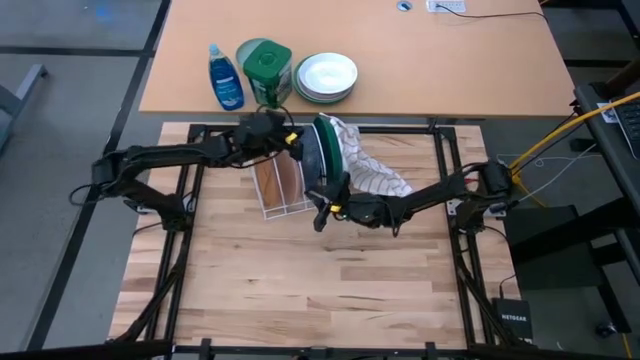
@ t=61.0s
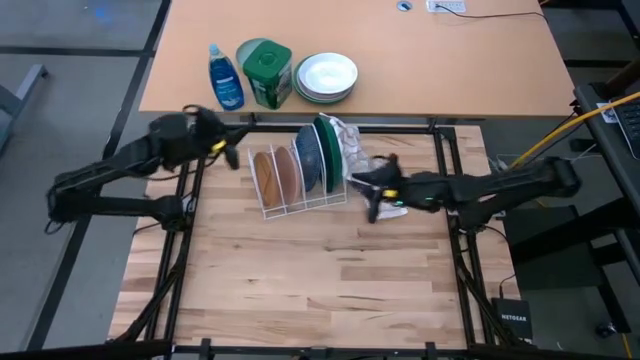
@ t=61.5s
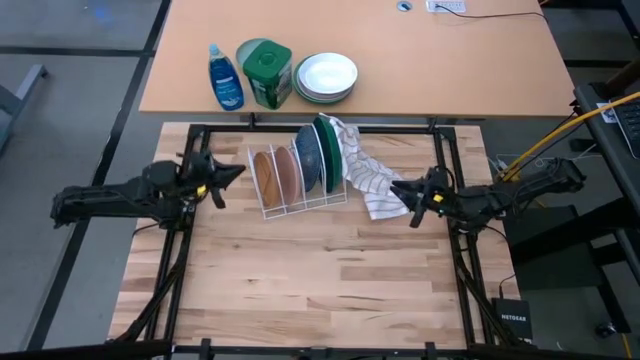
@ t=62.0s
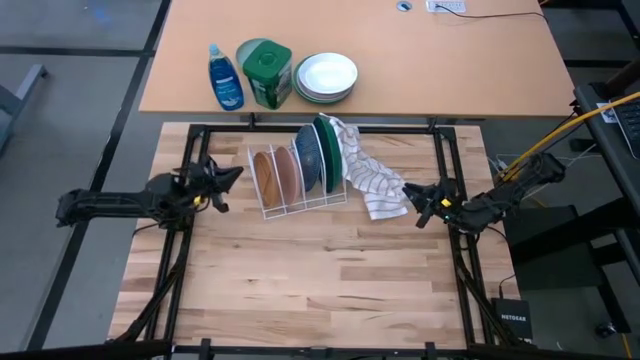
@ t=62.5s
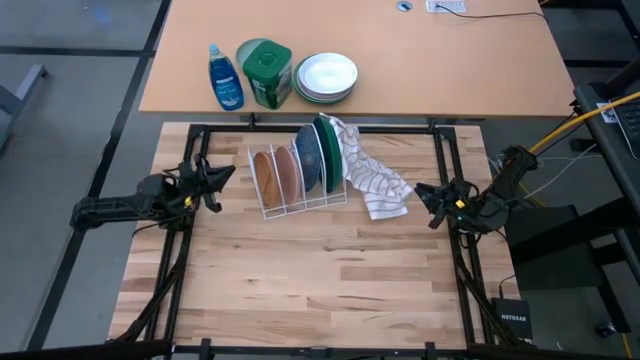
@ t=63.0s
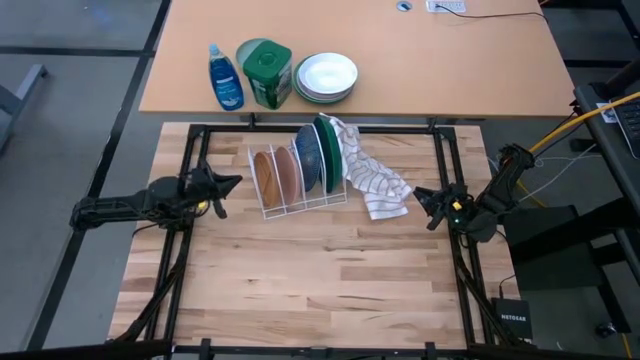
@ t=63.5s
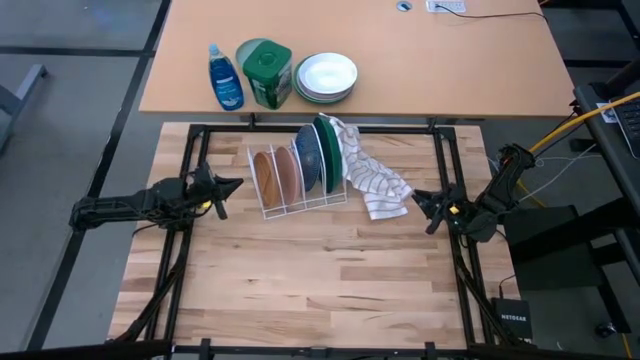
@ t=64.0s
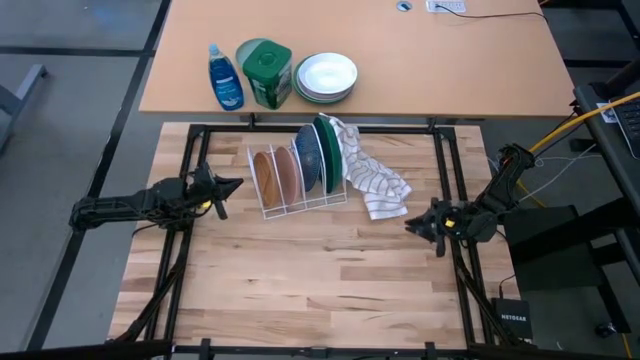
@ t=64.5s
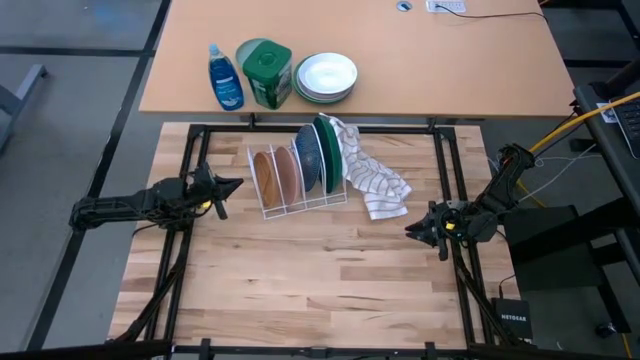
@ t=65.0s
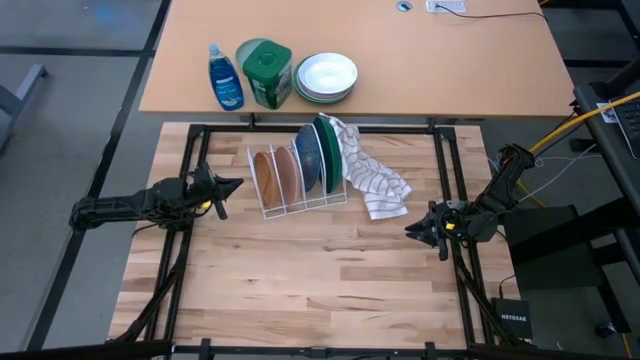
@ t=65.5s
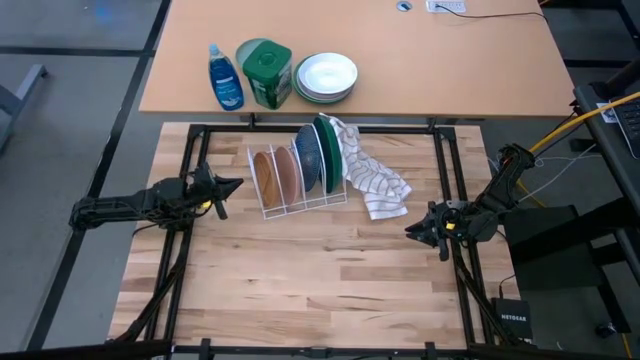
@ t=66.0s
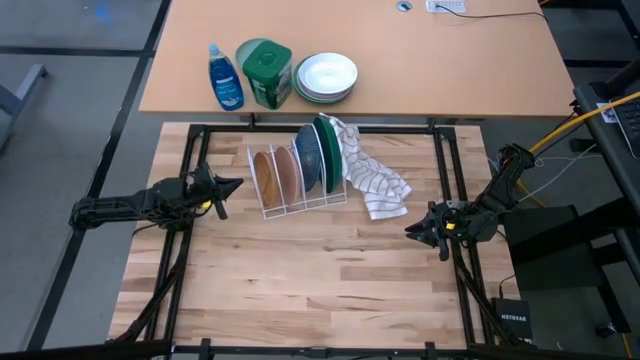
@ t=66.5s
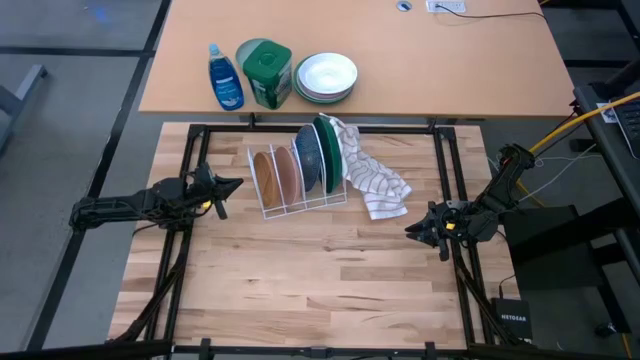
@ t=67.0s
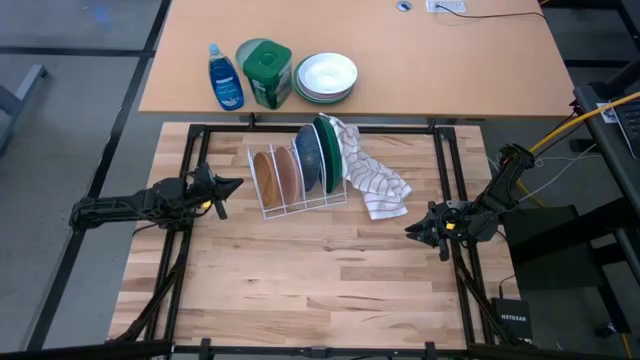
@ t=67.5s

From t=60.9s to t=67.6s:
Task: Sort dishes
Return to Home Position

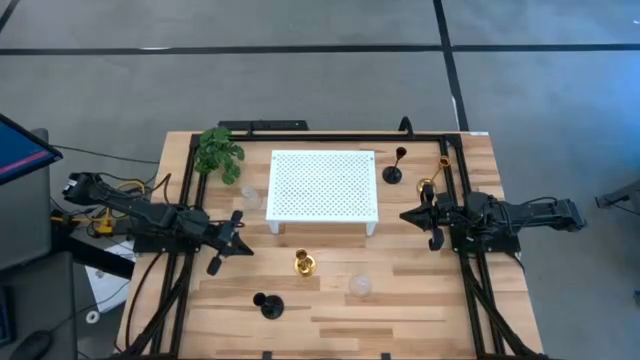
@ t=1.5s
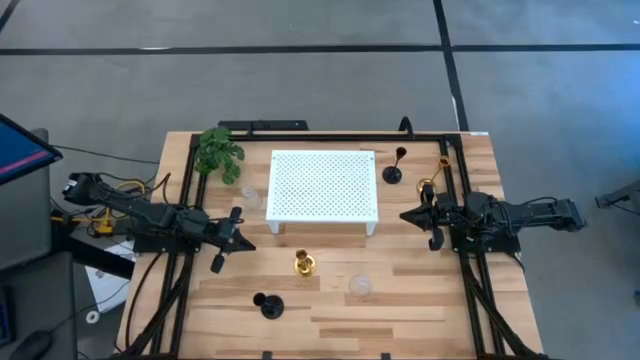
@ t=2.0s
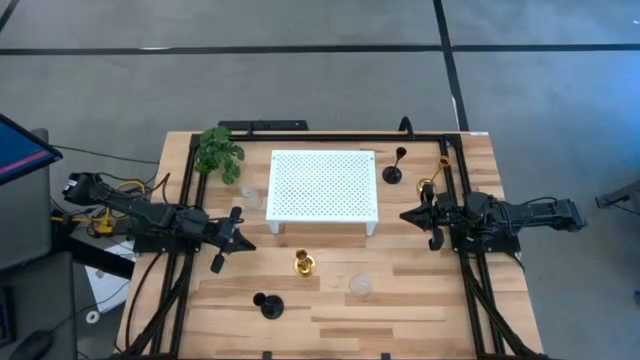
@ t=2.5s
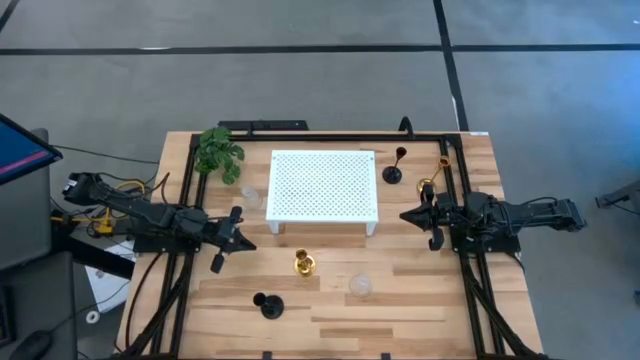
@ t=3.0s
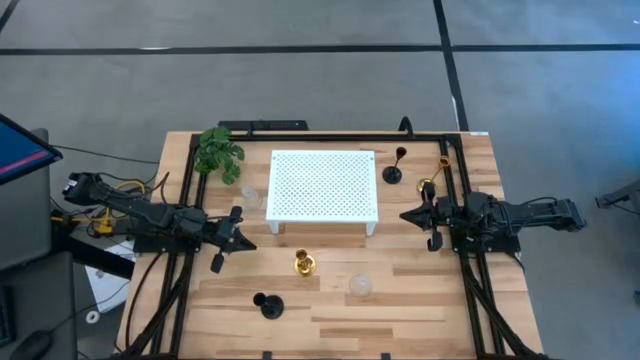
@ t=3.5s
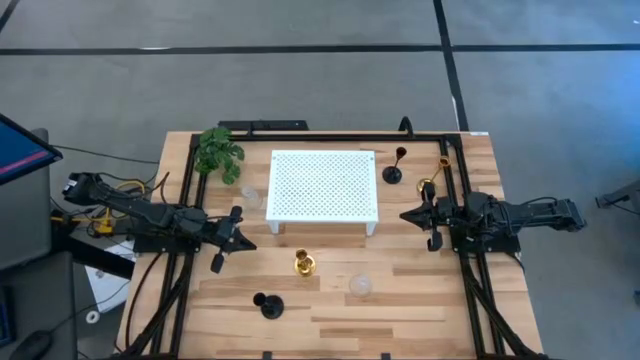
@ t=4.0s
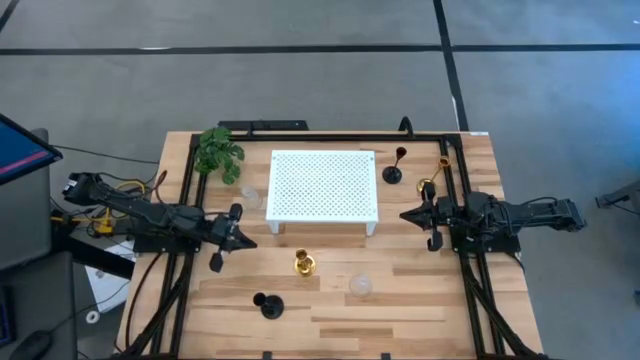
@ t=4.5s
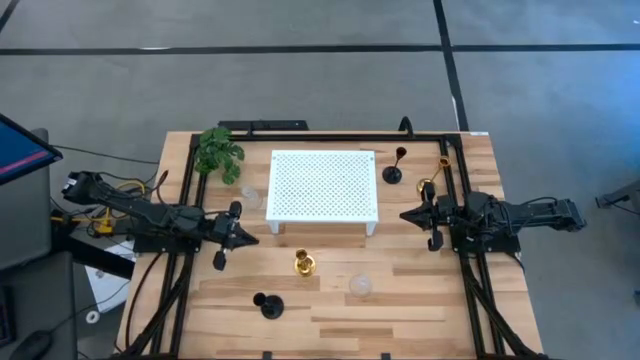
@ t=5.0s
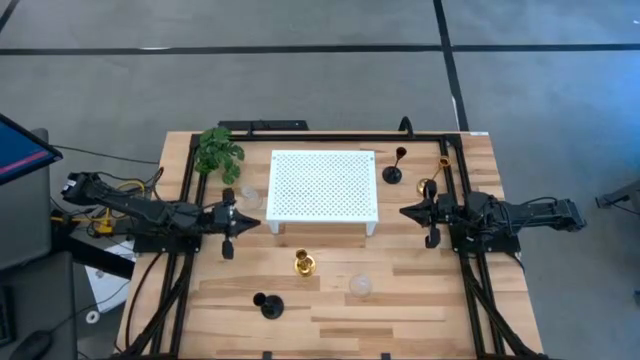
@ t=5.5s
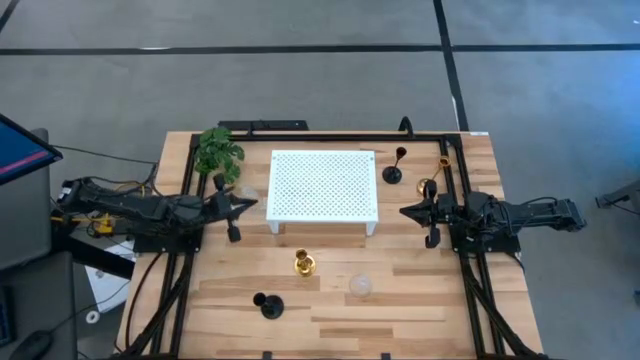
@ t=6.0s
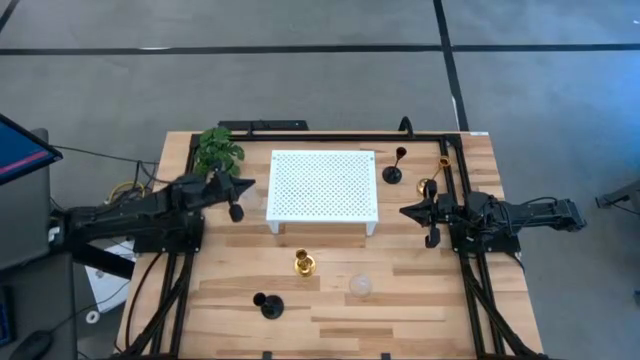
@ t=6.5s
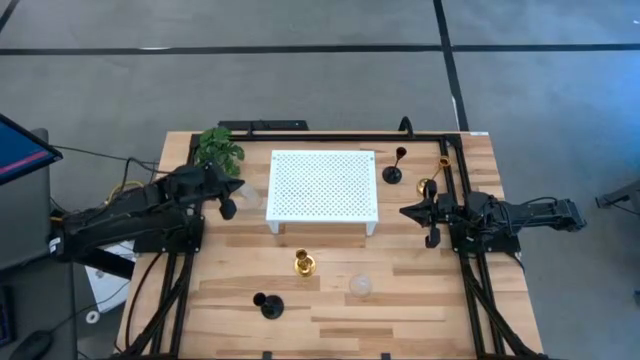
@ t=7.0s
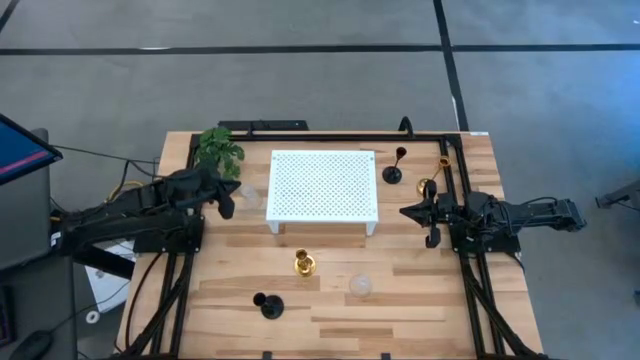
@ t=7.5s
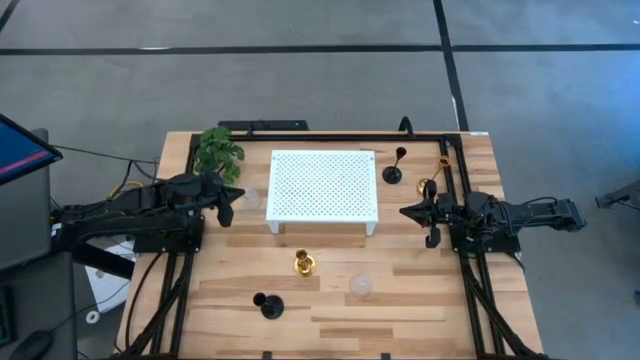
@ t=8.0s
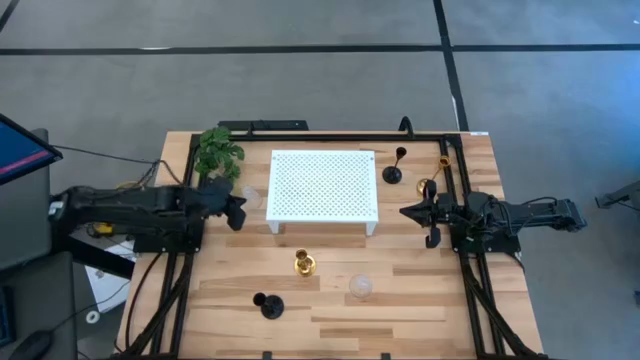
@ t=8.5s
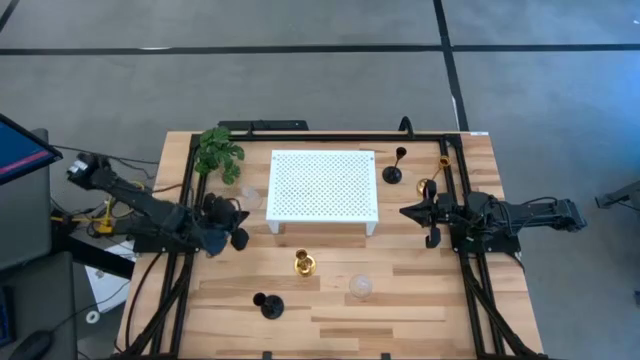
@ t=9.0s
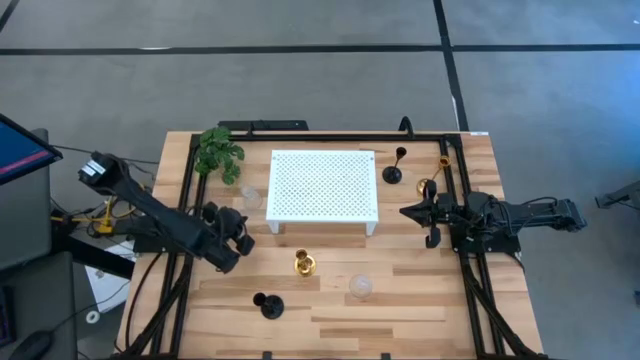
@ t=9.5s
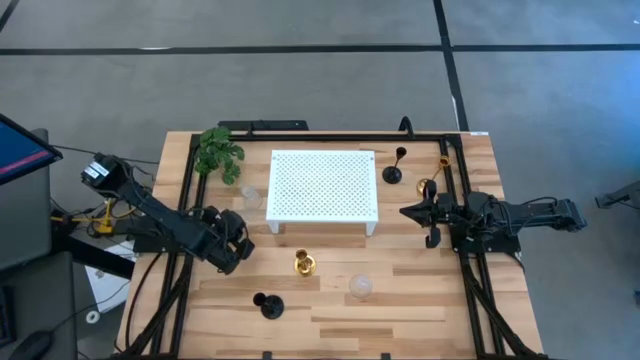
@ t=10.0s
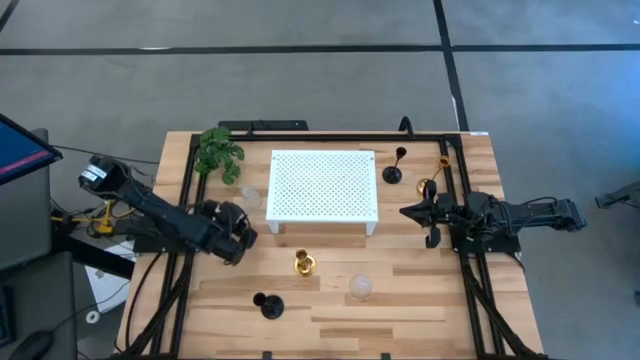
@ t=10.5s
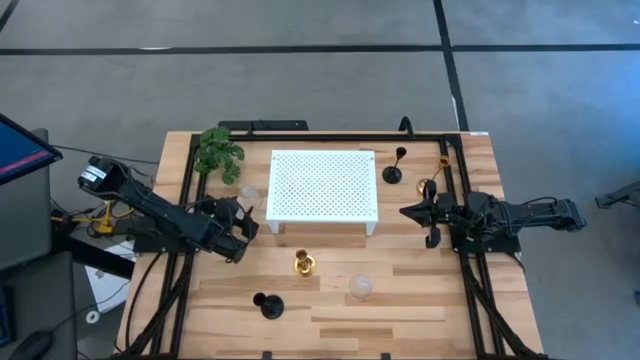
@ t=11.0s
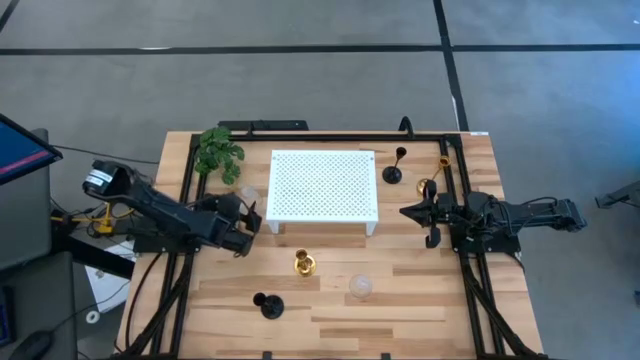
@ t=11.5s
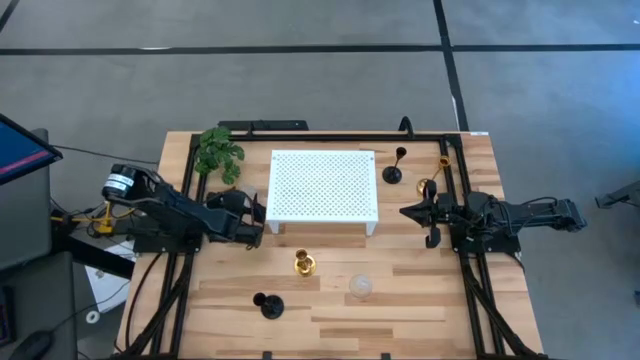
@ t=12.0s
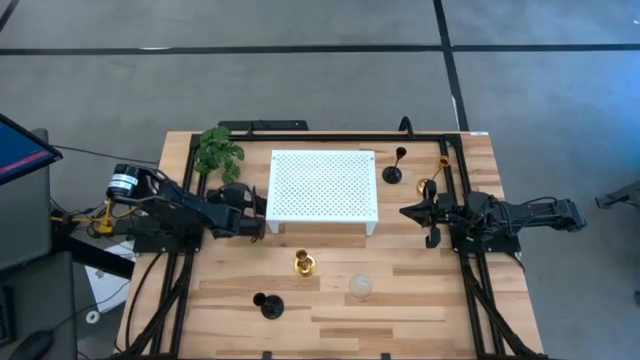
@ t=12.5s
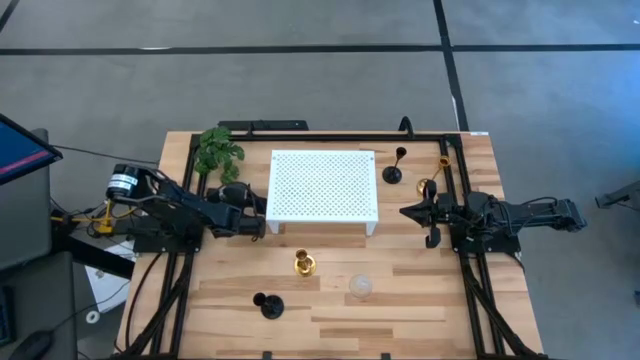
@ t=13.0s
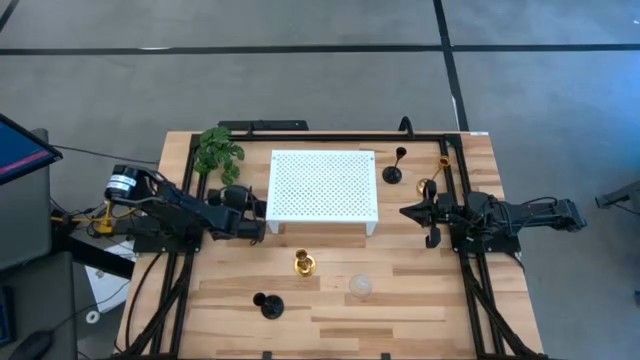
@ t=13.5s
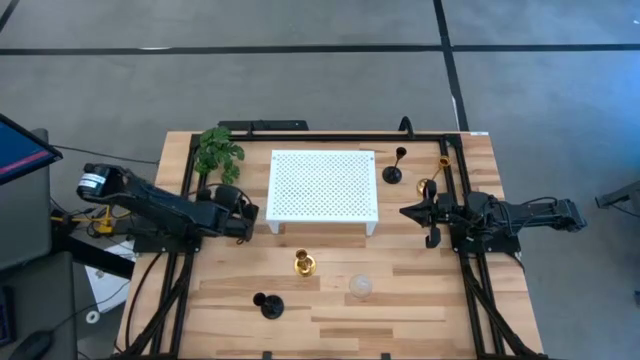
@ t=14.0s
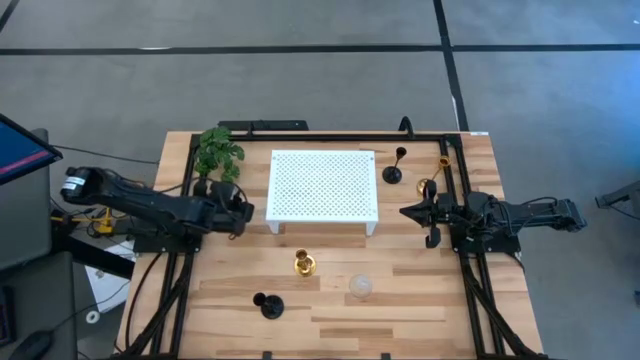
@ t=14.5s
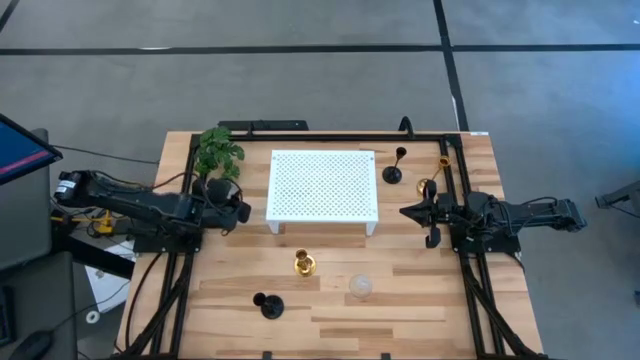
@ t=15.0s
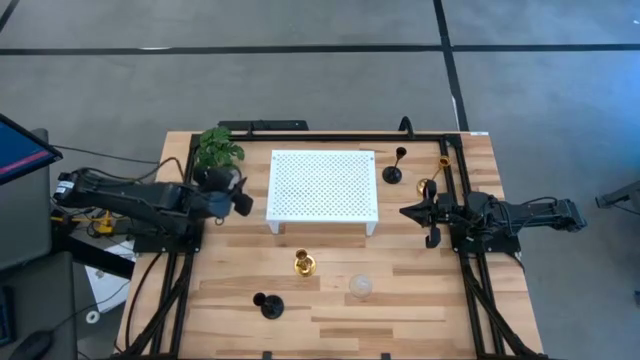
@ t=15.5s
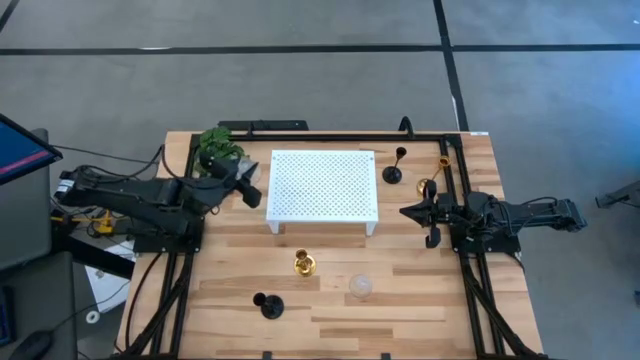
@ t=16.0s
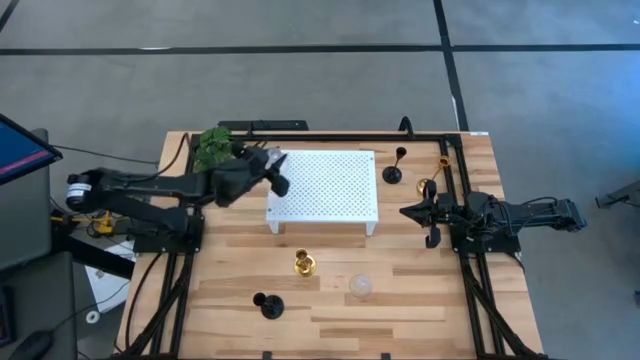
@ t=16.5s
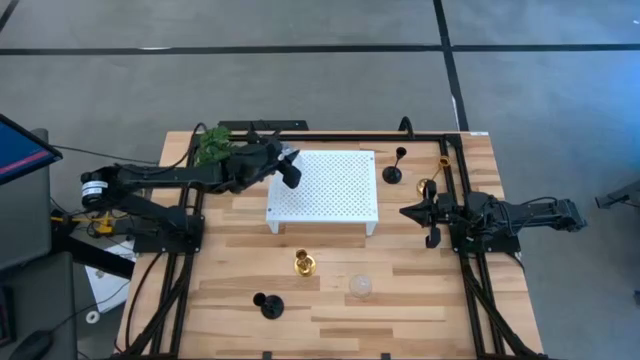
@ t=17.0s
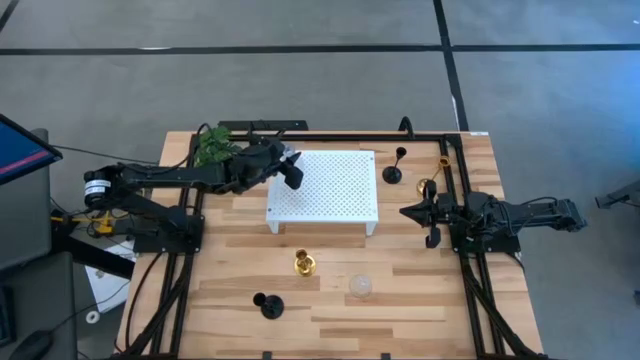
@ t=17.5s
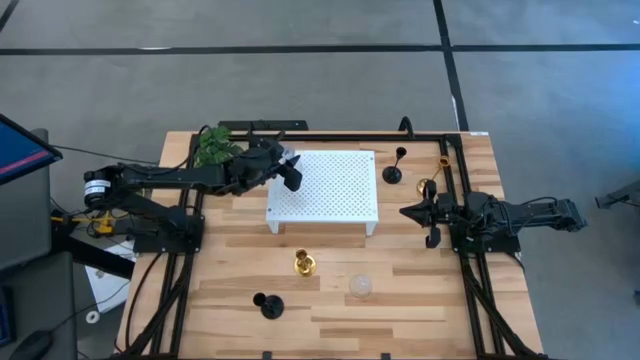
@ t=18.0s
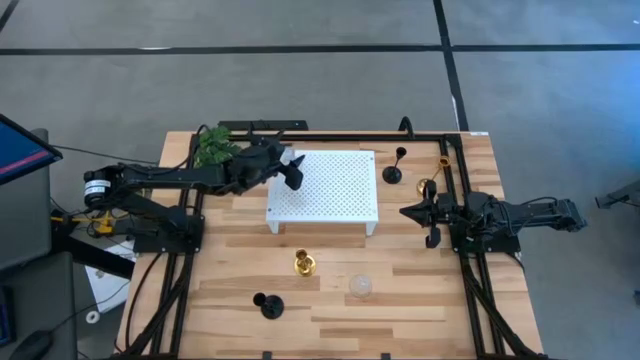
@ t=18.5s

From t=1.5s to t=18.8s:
Task: Pick & Place candle stick holders
Put the top glass candle holder on the shelf
